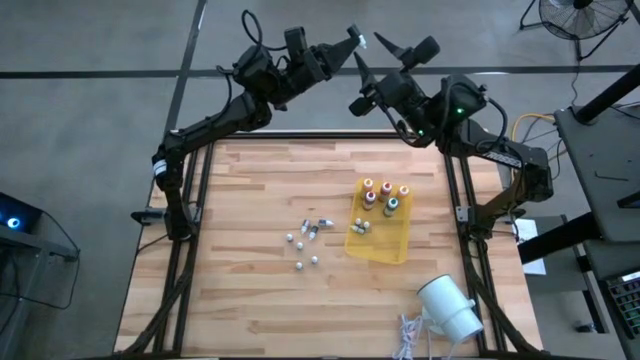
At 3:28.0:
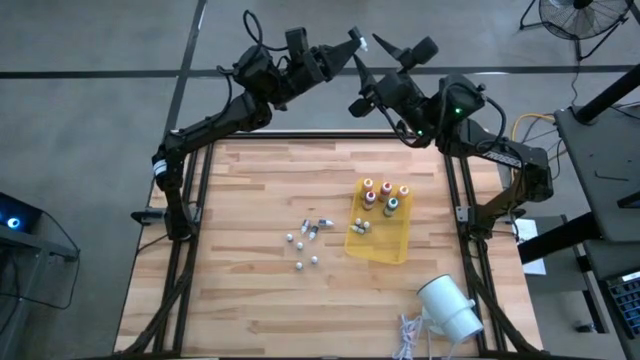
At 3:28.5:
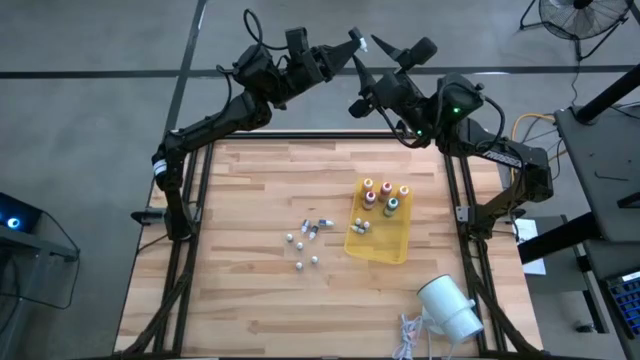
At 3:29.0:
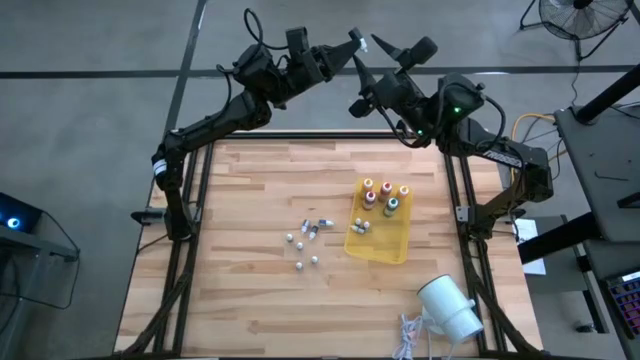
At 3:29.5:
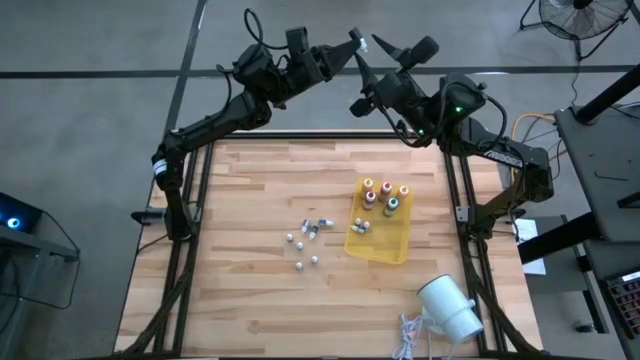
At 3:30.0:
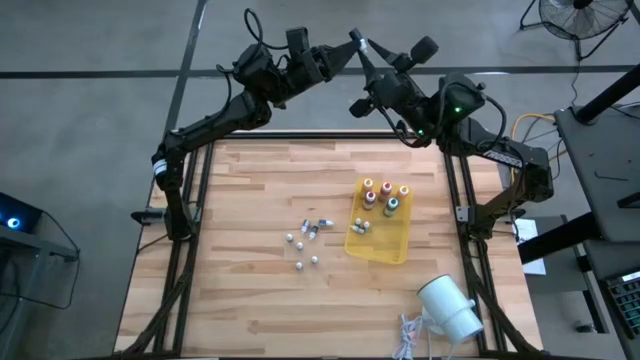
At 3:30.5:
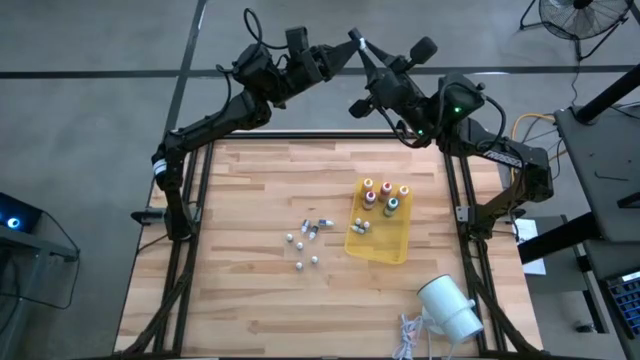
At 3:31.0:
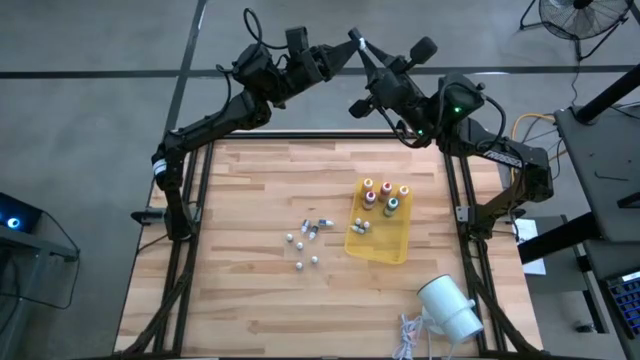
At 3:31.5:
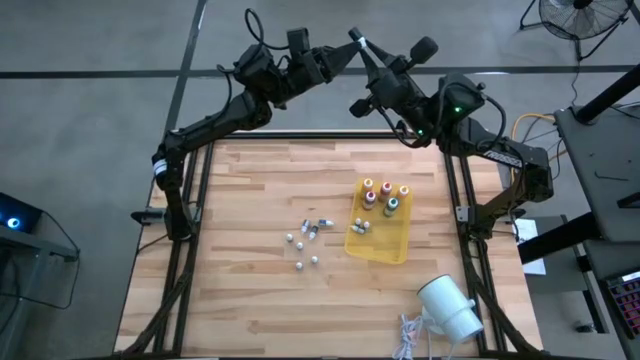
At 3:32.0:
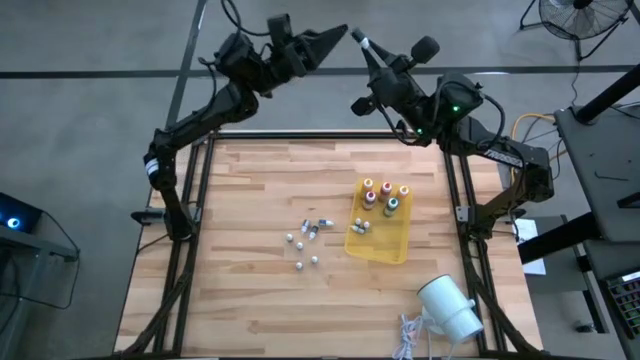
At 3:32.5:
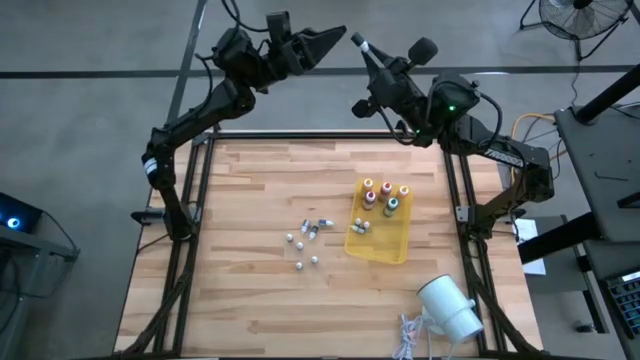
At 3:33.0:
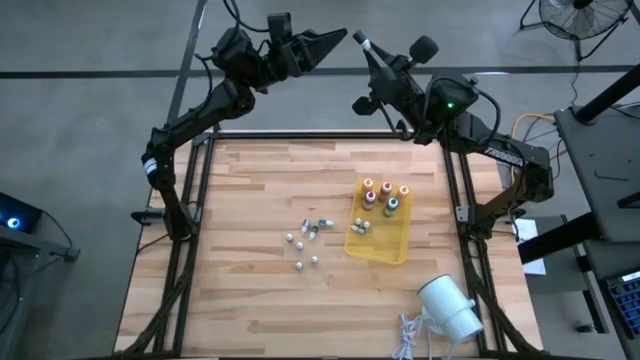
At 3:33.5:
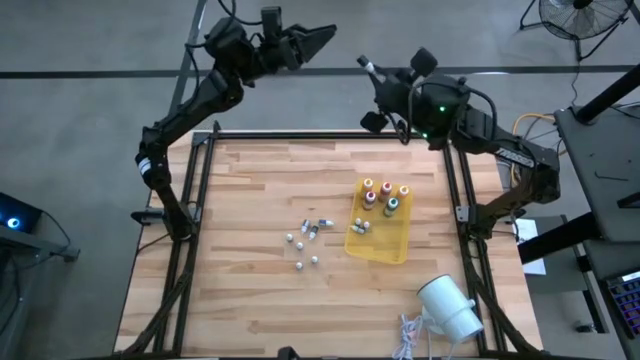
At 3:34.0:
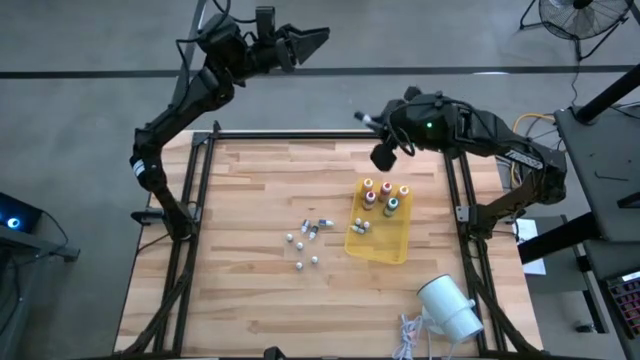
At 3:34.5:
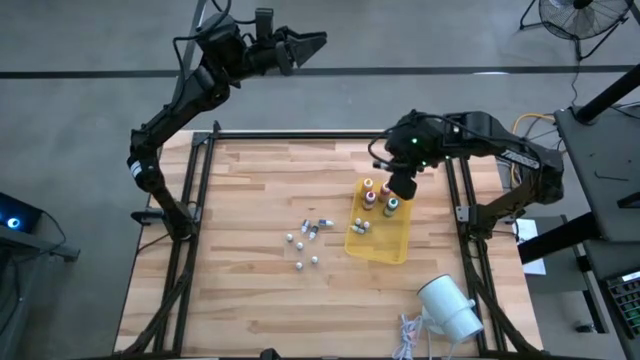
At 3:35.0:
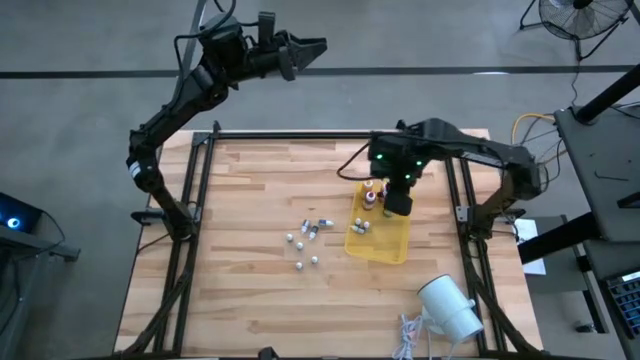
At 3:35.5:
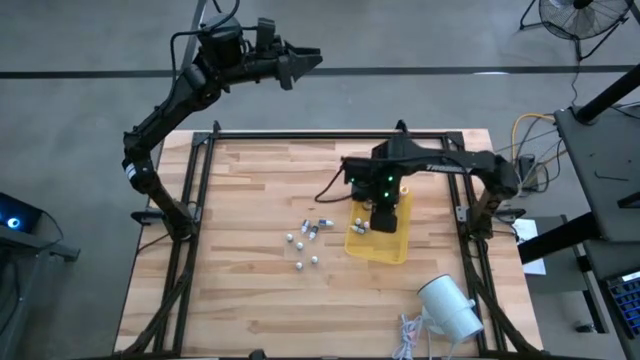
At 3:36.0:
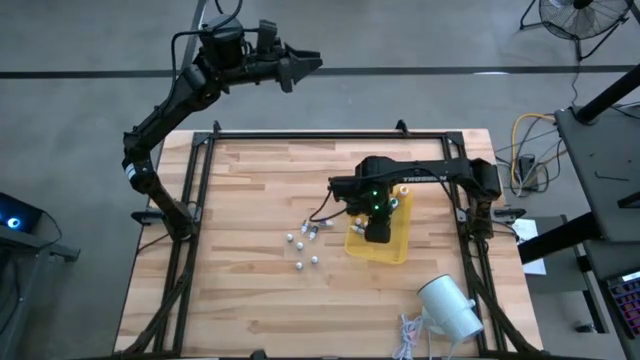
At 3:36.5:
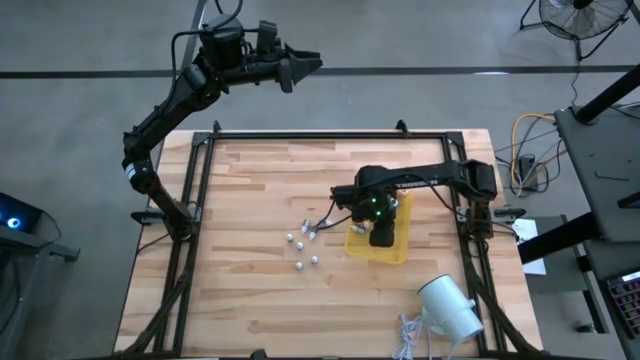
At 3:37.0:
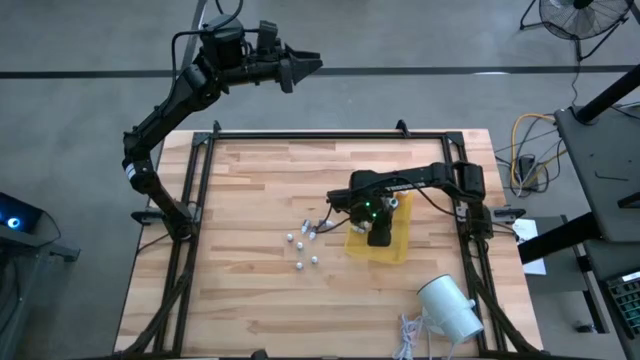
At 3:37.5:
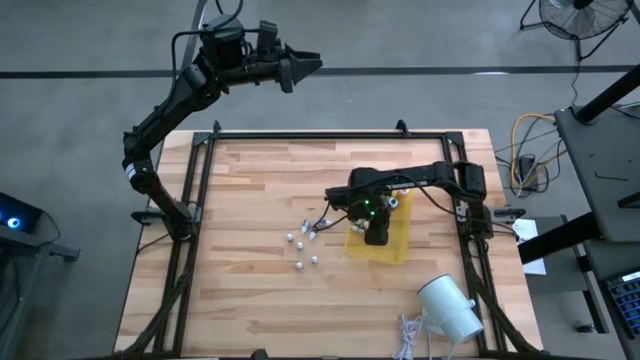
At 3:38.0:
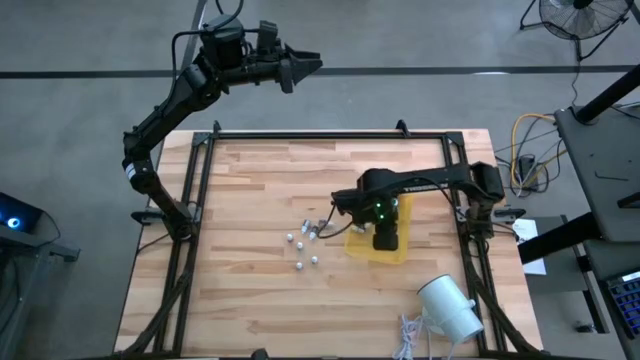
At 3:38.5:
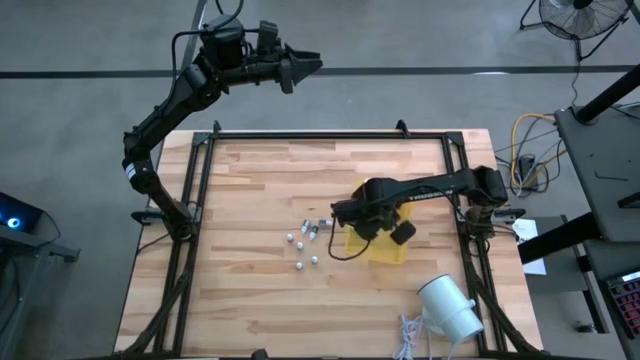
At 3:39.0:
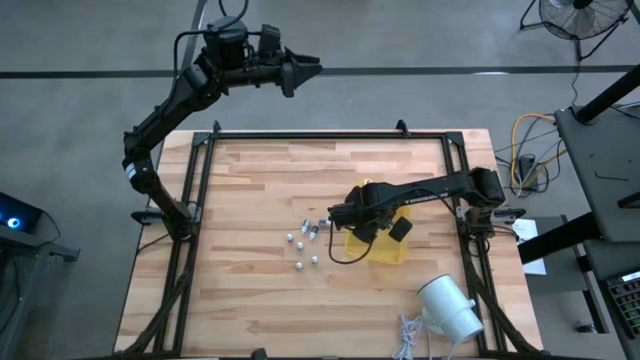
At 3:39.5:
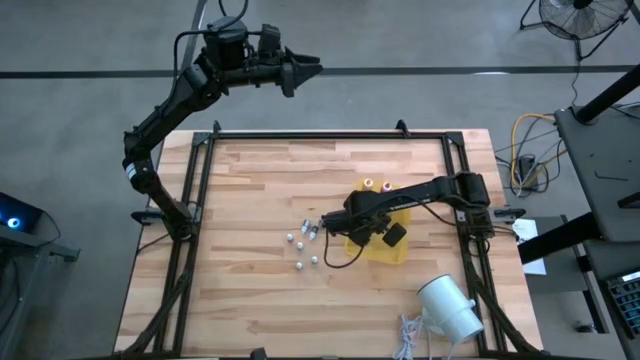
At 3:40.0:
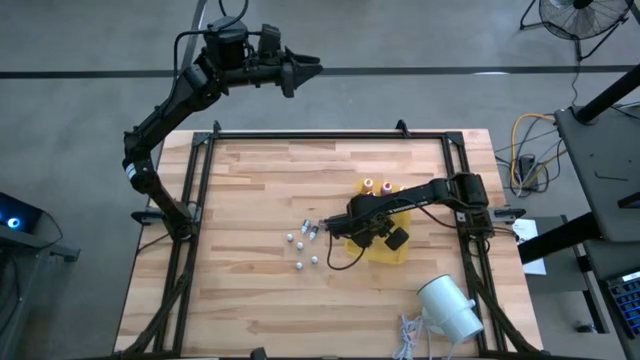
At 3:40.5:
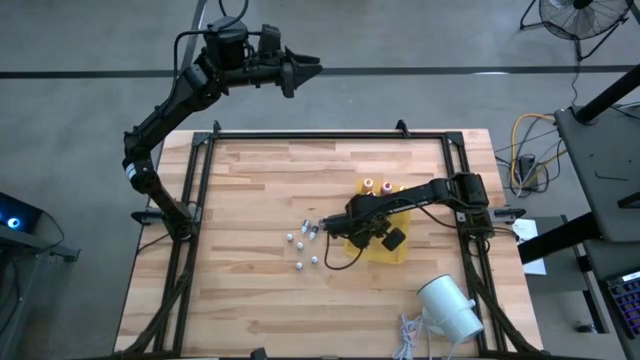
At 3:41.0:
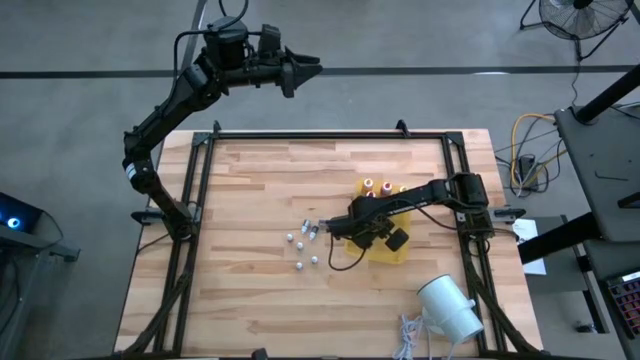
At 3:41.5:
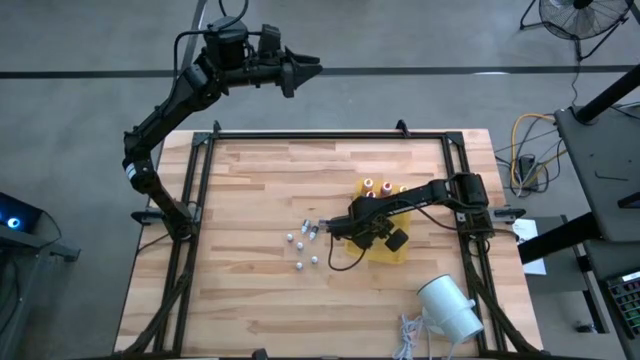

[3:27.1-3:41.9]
Task: Pick & Place food coloring
Put the top small black food coloring bottle into the yellow bin

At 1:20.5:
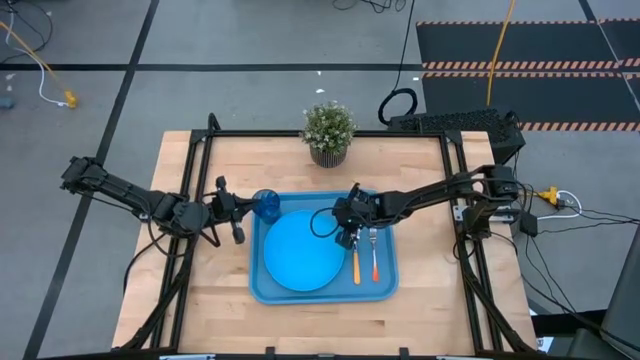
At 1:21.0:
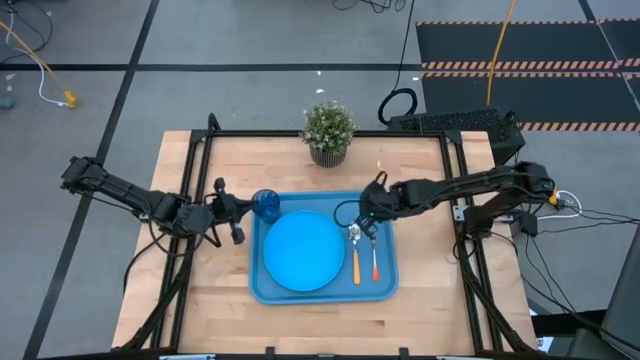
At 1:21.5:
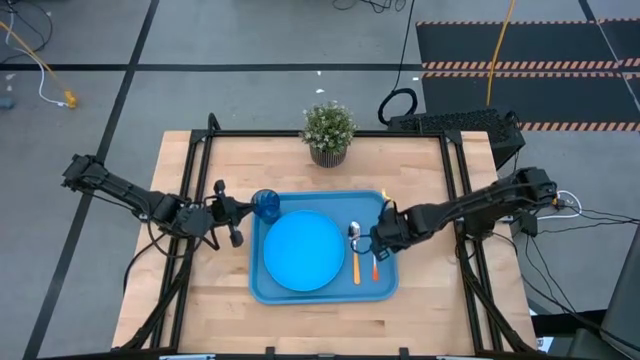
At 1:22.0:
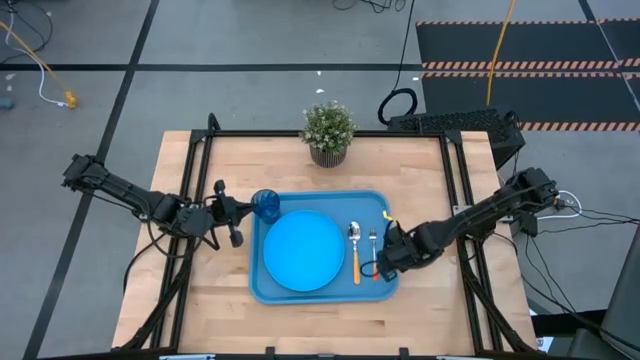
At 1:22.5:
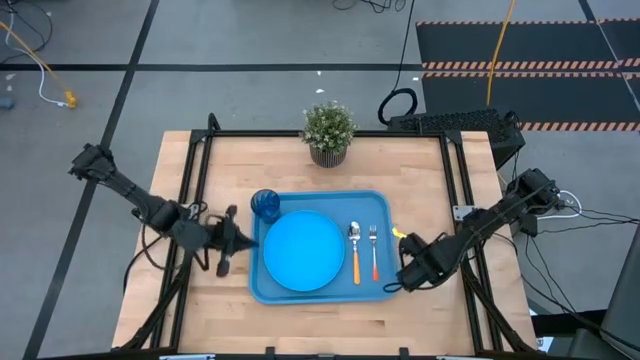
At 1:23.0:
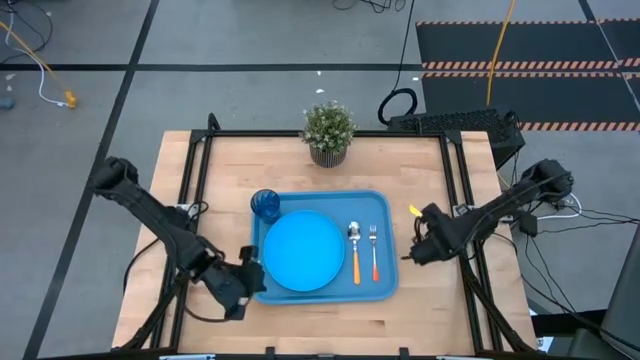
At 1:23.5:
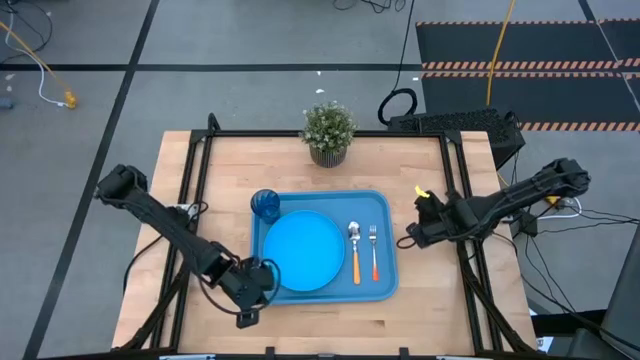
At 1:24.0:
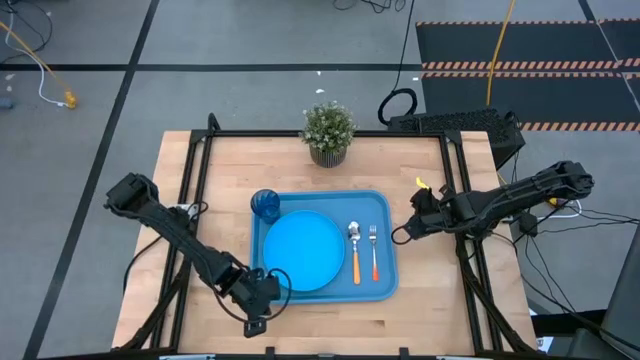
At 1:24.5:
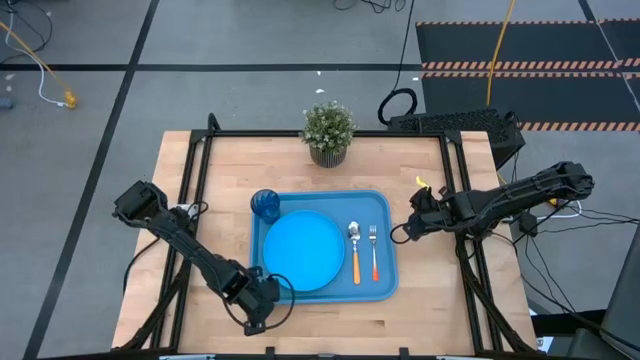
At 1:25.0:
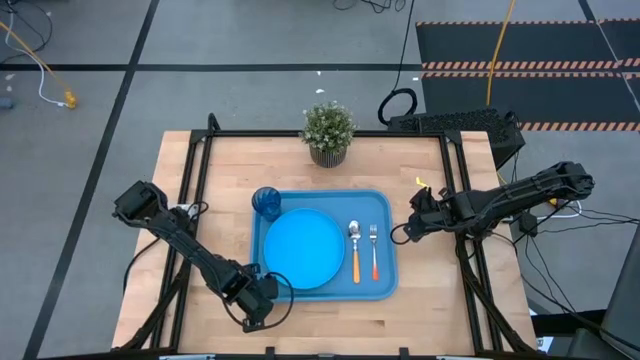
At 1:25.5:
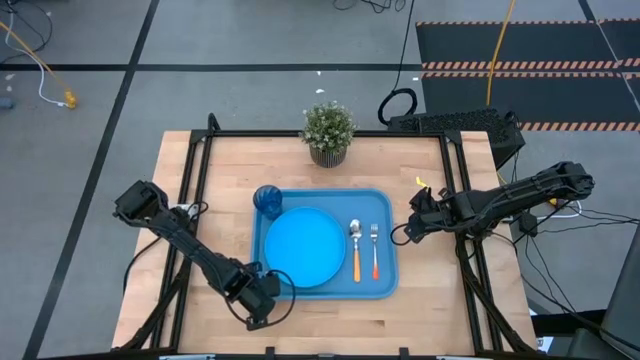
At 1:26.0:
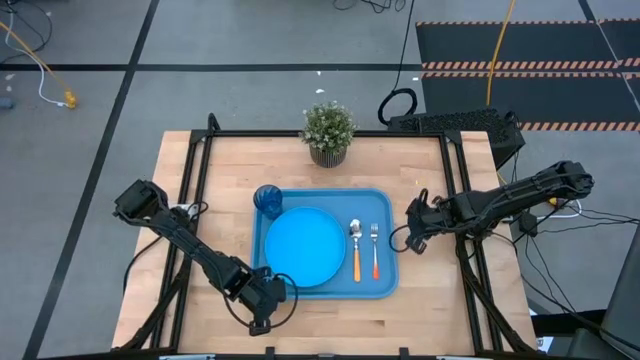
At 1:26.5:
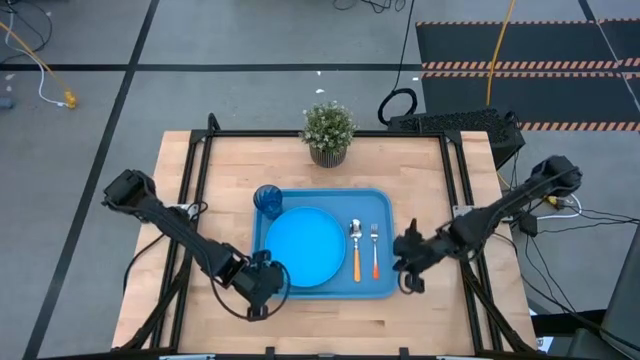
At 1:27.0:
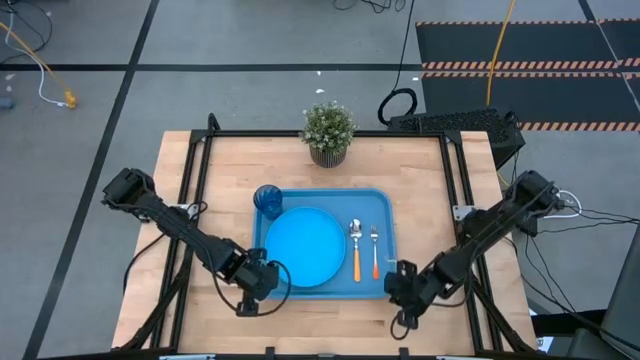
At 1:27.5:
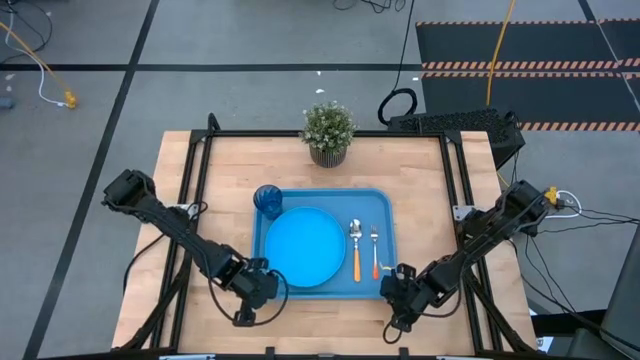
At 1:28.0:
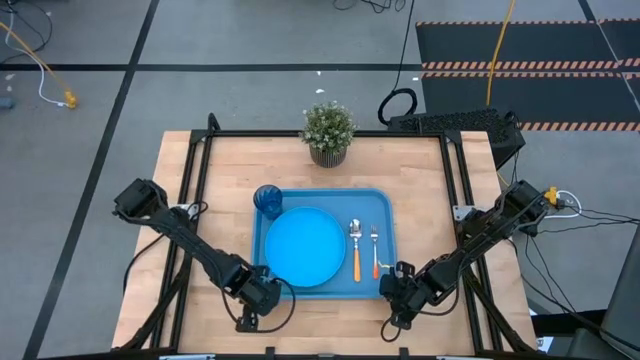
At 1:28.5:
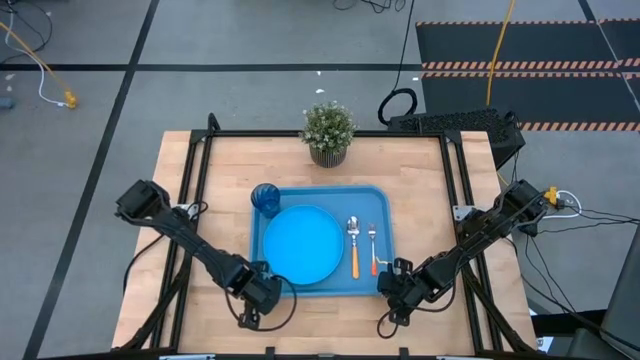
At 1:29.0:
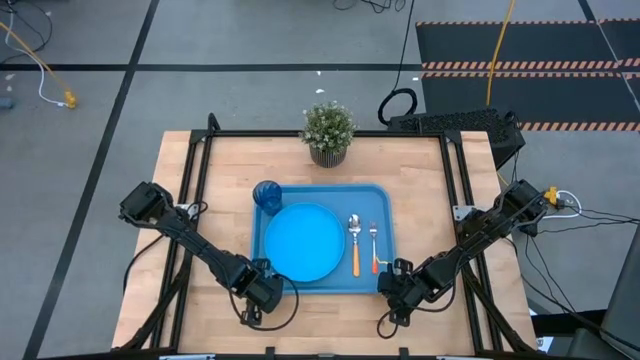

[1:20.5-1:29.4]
Task: Pick and place plate/cup/fork/spoon on tray
Adjust the blue tray on the table
